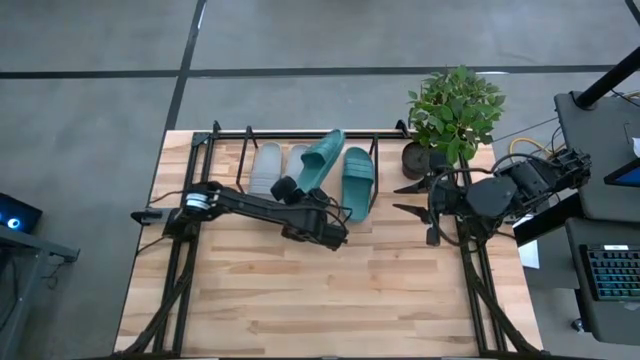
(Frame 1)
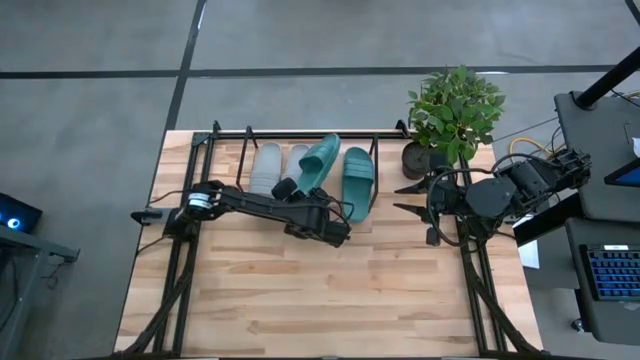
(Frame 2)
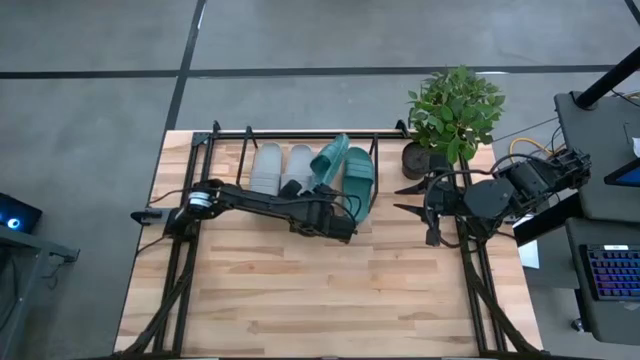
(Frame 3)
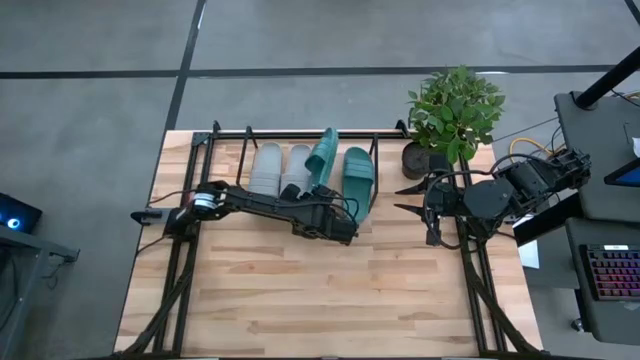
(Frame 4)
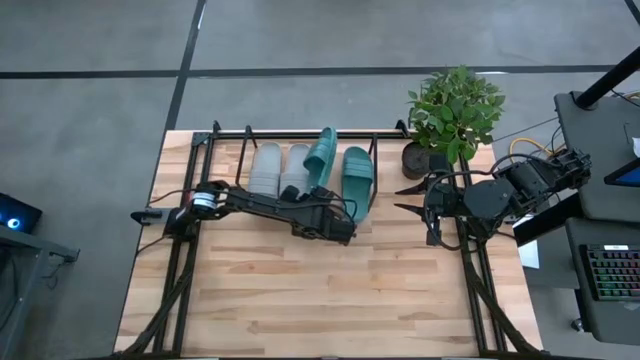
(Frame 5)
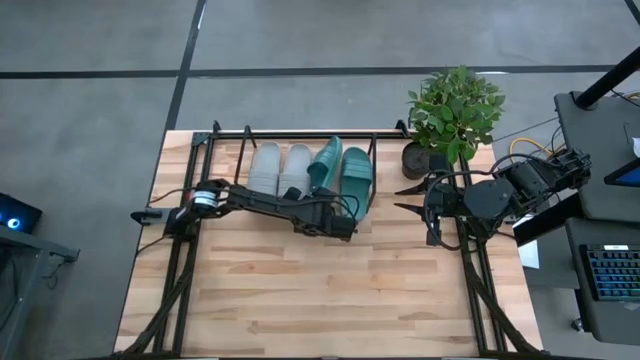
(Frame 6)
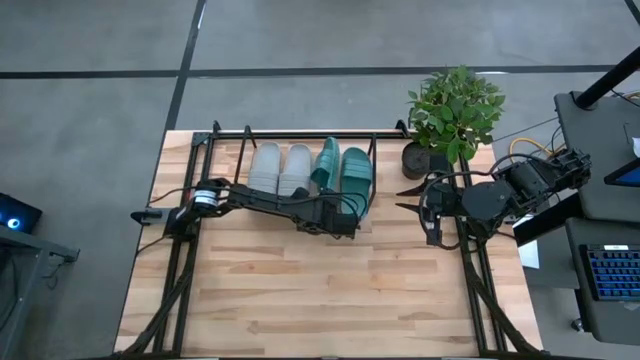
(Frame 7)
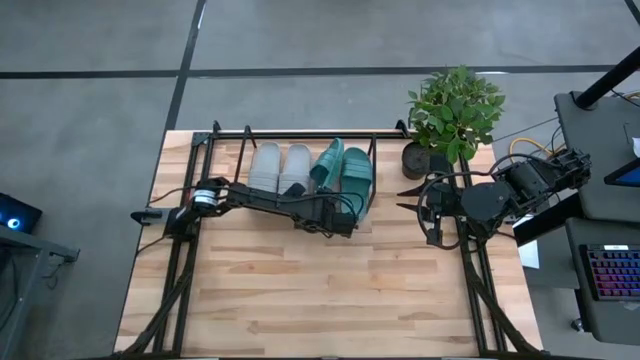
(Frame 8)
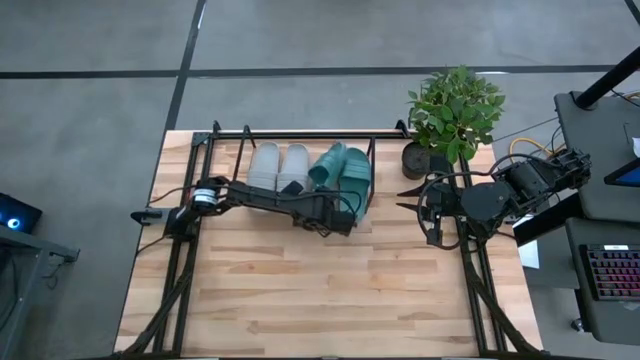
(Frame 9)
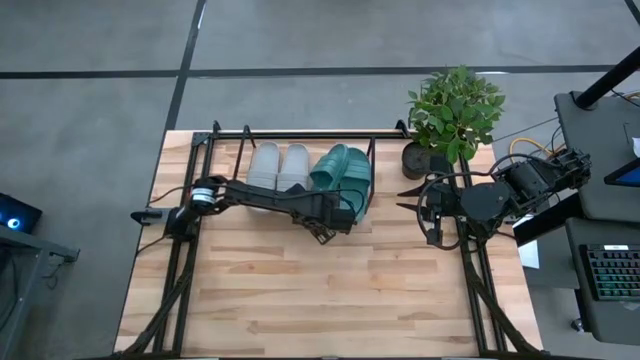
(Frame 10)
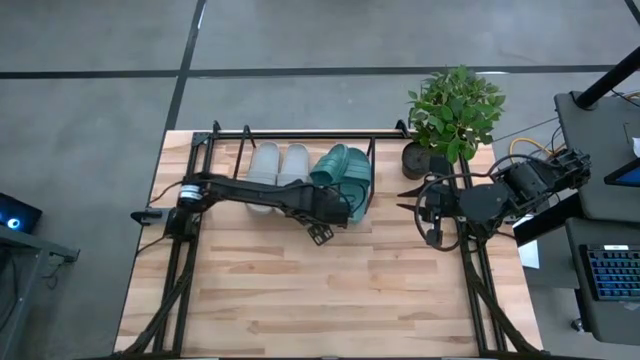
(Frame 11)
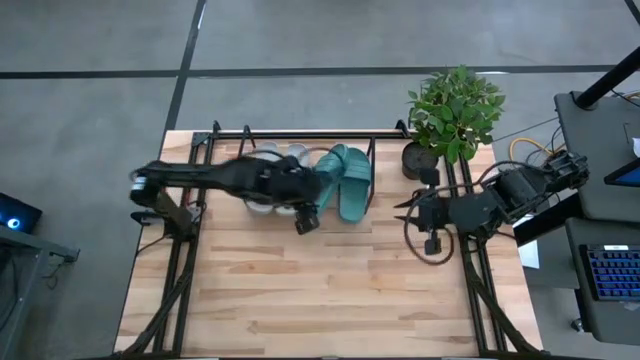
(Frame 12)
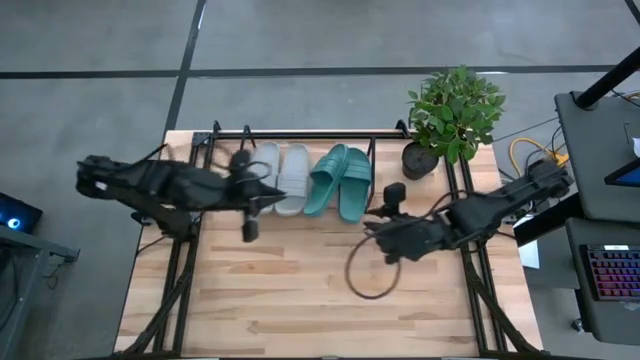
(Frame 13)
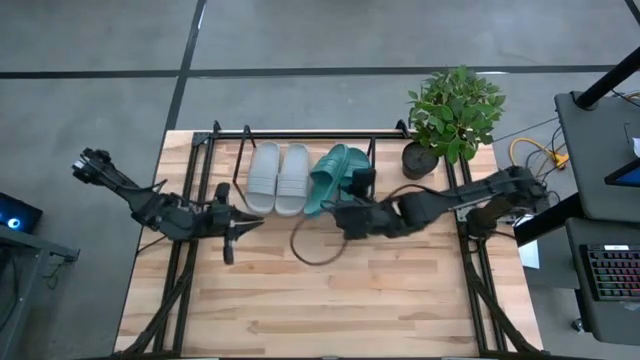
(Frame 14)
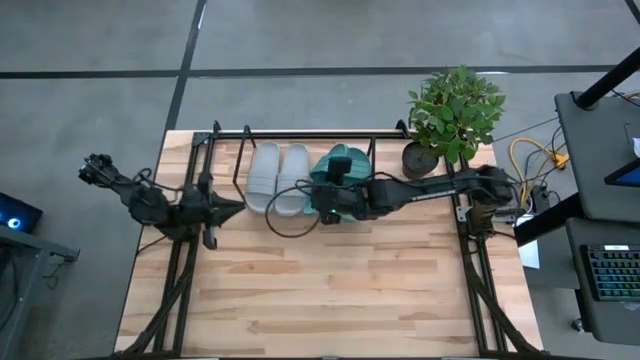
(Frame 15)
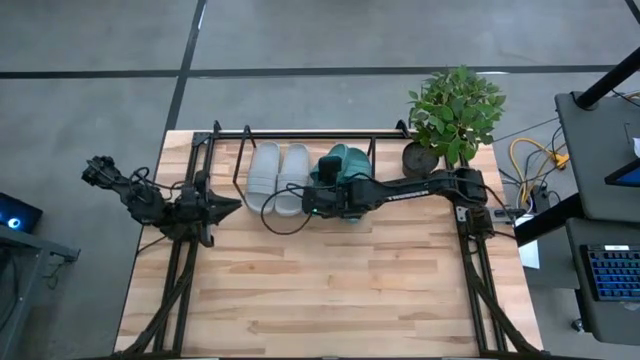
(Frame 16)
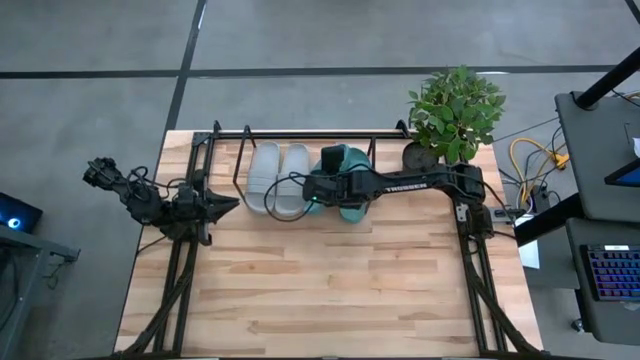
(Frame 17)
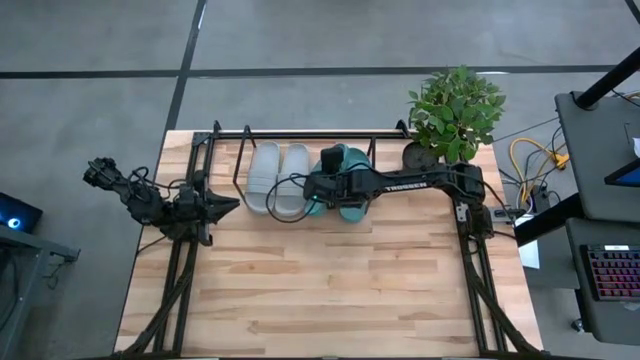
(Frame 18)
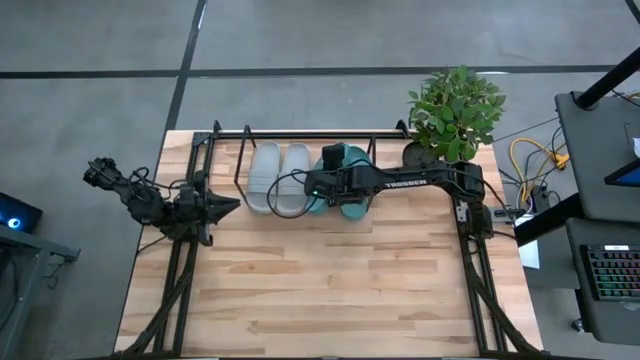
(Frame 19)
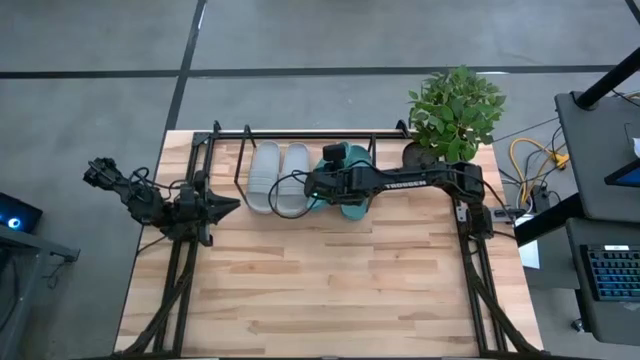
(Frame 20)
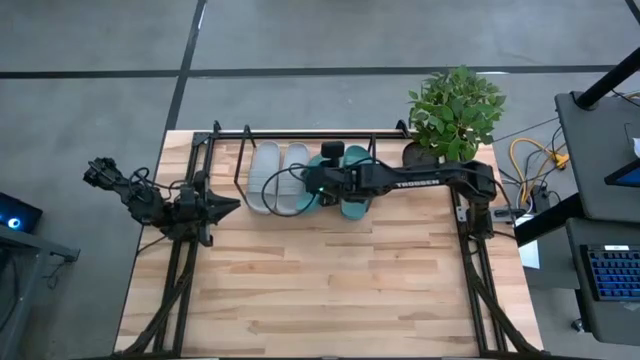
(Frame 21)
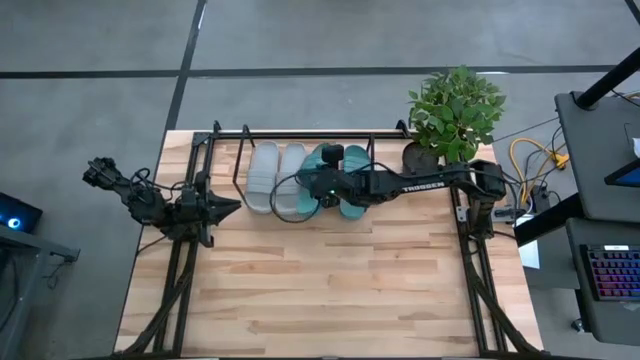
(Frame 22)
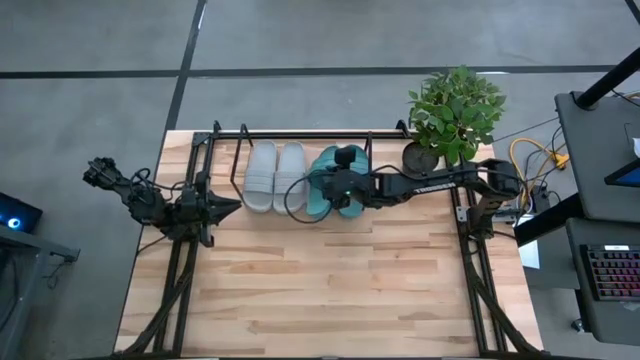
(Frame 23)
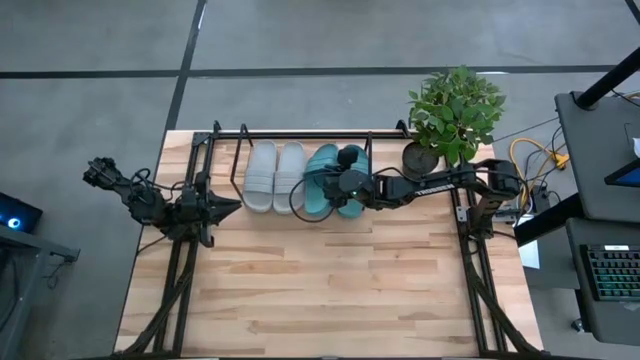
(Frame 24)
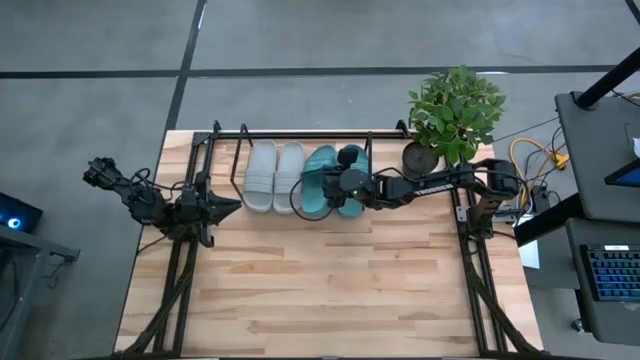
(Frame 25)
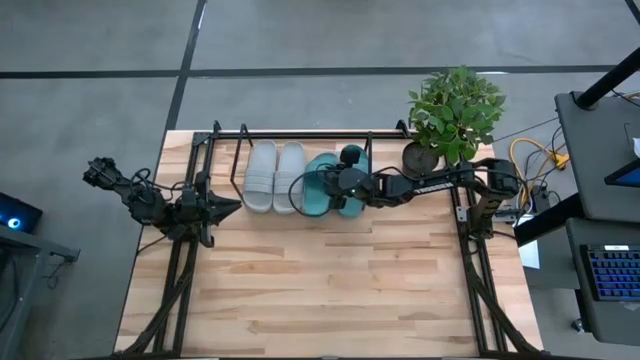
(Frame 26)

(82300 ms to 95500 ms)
Task: Pick and place slides into the shelf
Put the green slide on the shelf

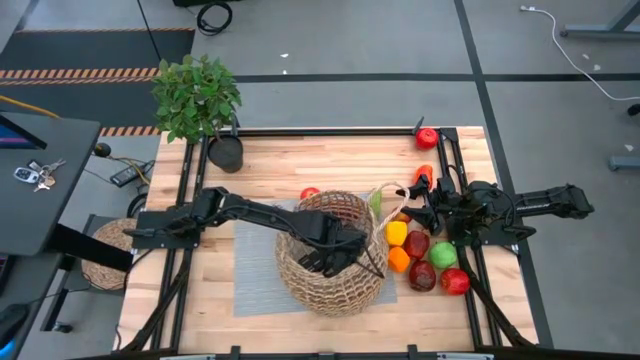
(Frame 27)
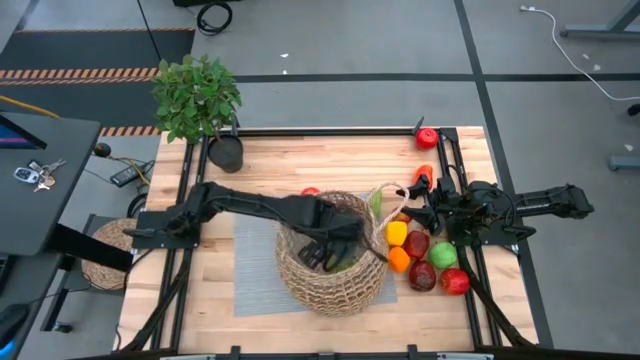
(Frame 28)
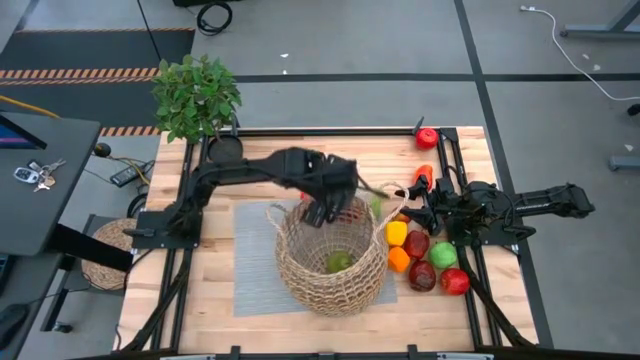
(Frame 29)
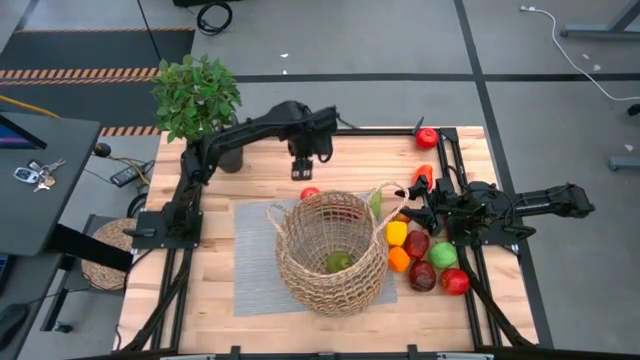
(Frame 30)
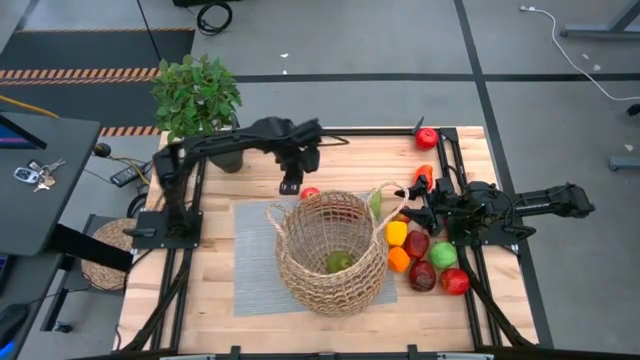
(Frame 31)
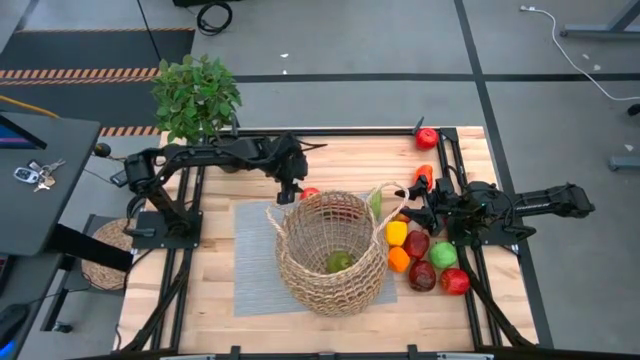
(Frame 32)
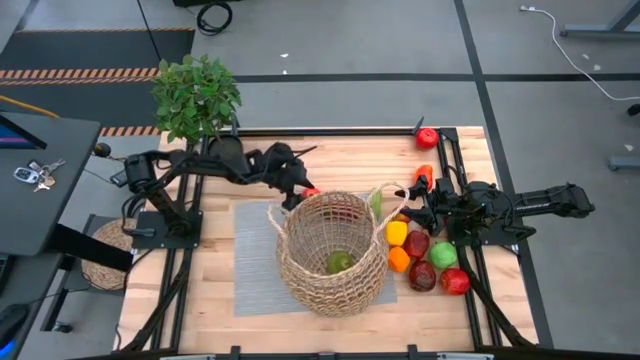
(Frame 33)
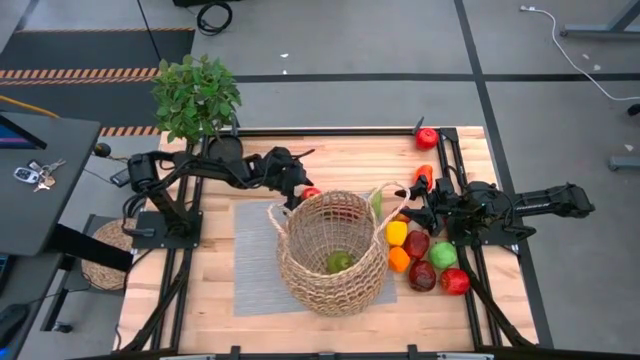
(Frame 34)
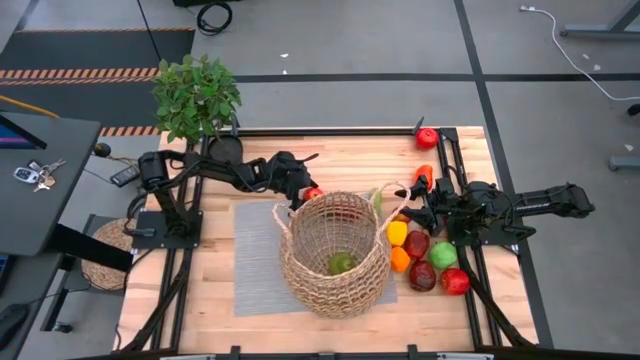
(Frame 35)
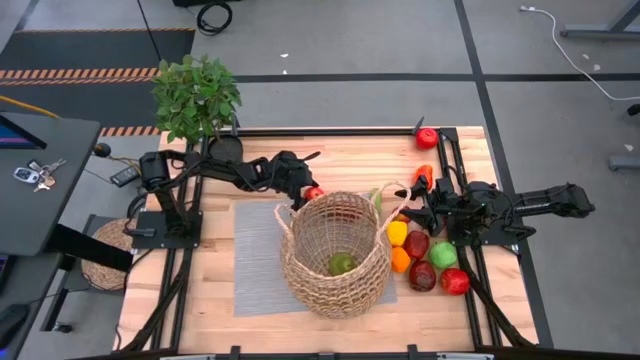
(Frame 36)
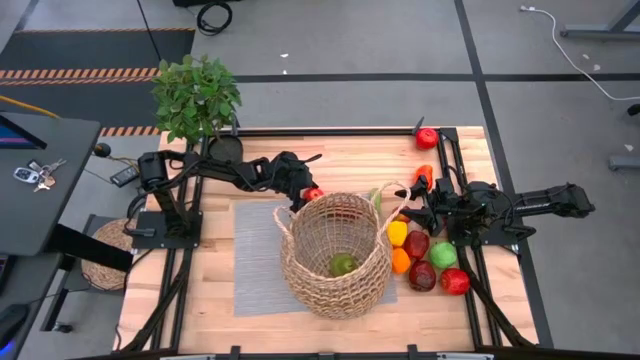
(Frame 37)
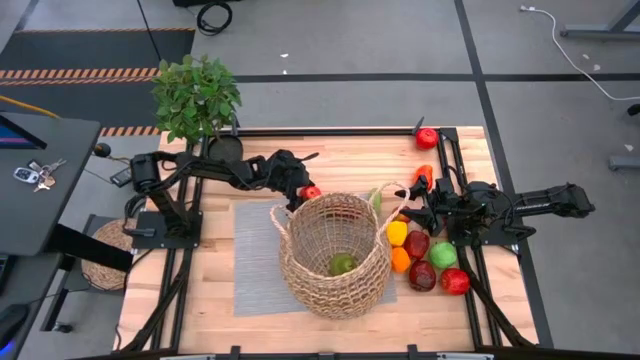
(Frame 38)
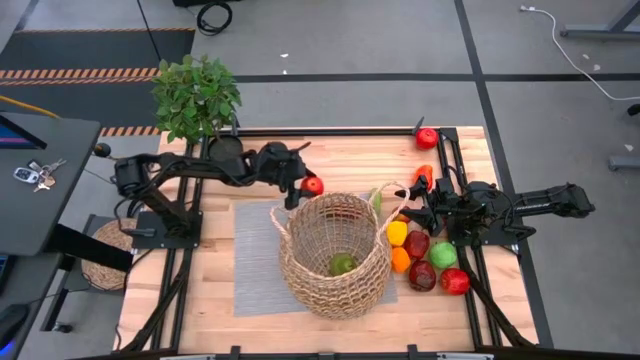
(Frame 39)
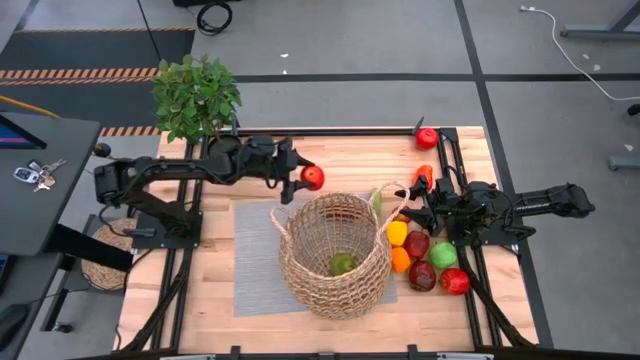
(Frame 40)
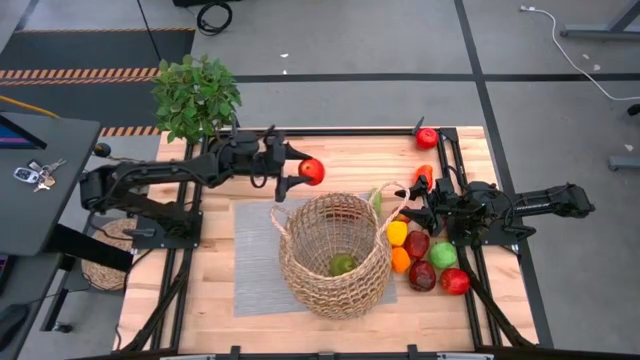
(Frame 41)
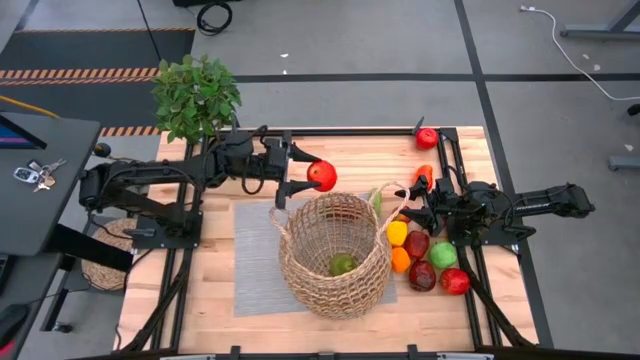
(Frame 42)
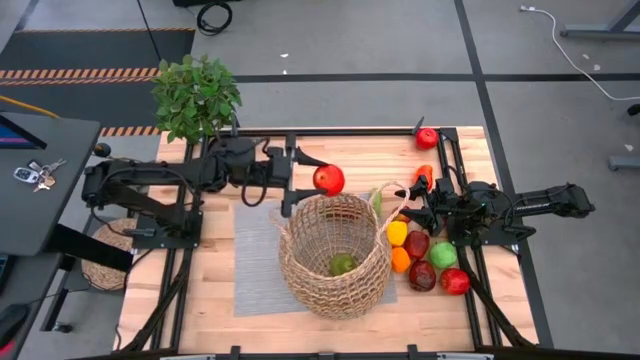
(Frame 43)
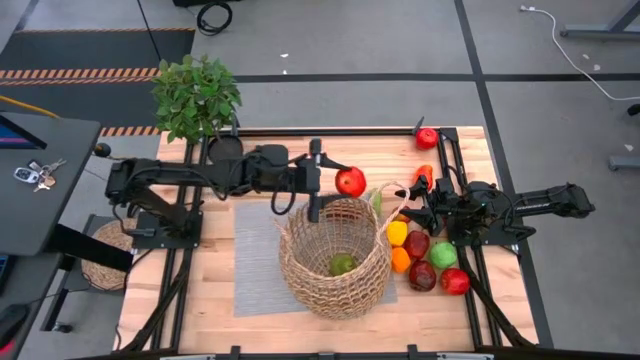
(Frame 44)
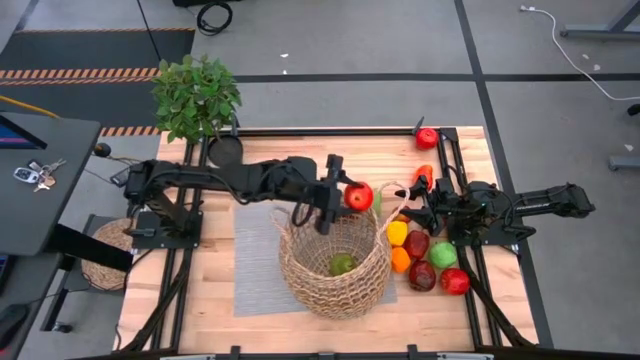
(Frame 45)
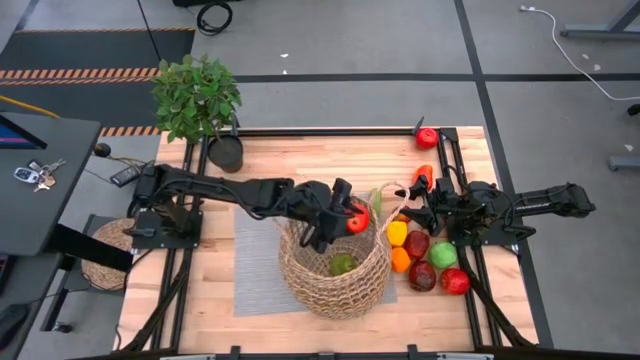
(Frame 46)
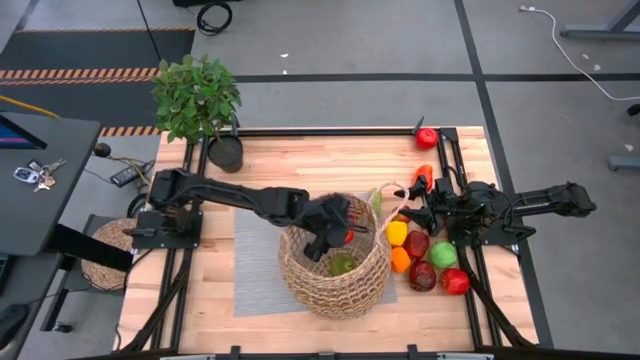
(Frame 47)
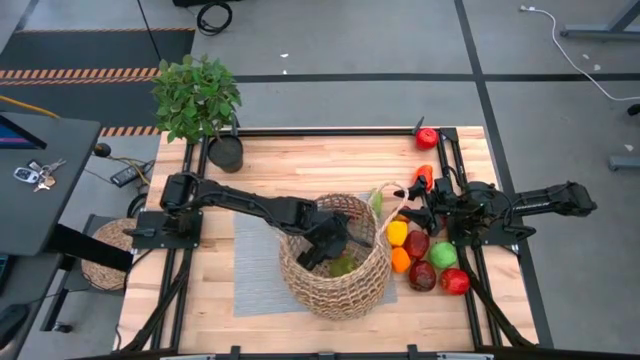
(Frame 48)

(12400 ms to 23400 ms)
Task: Build produce basket
Put the red apple into the basket
